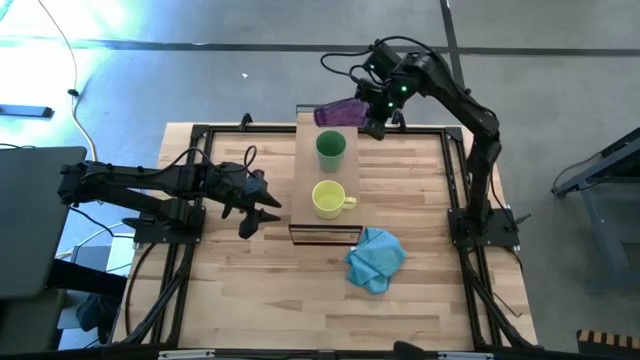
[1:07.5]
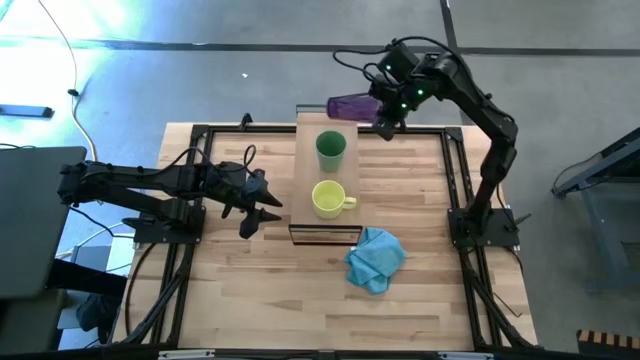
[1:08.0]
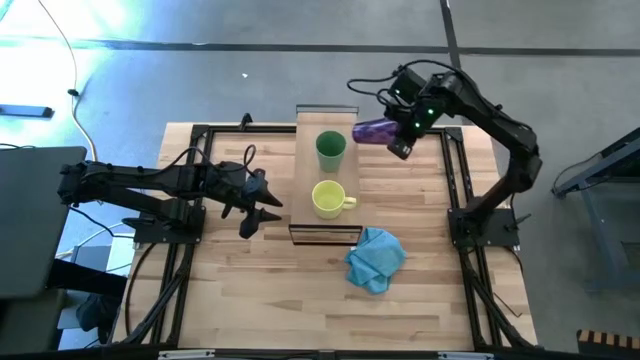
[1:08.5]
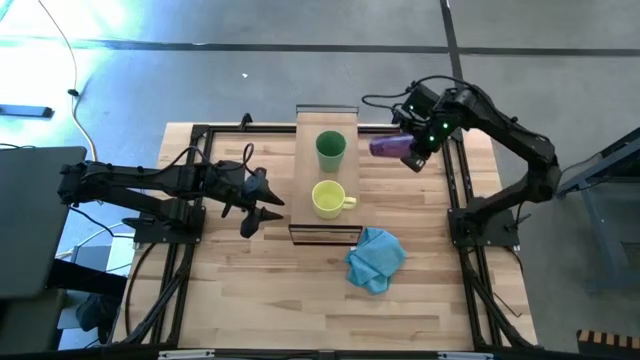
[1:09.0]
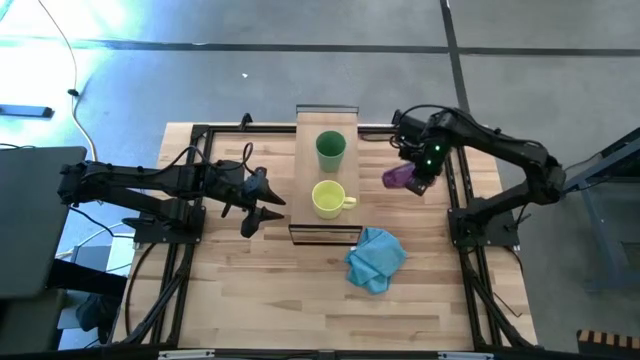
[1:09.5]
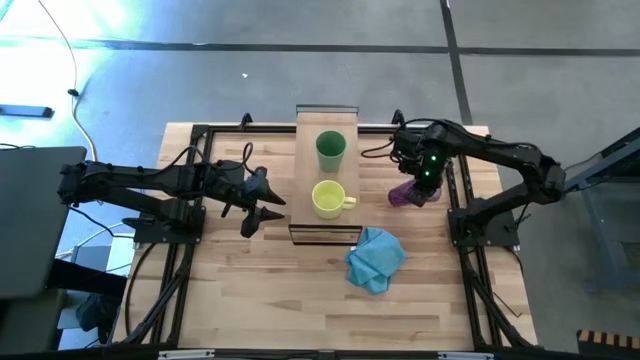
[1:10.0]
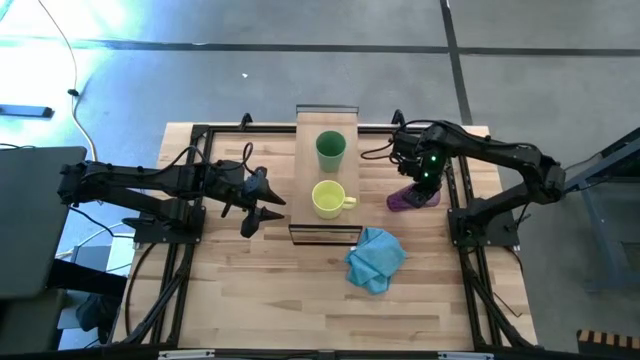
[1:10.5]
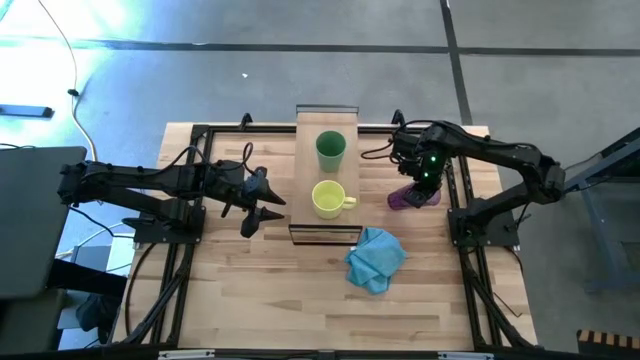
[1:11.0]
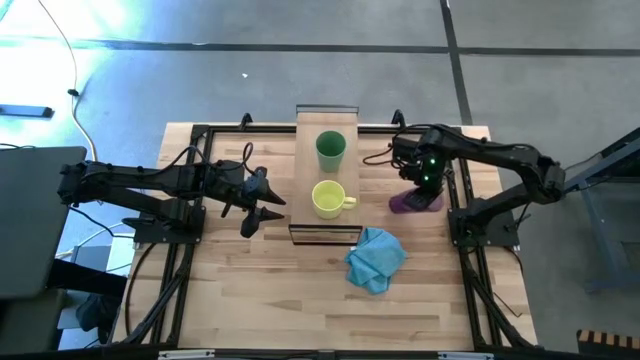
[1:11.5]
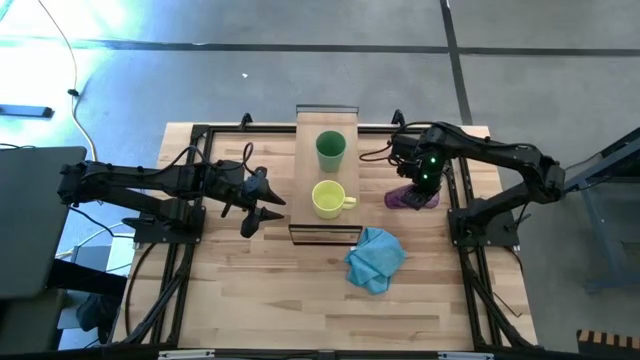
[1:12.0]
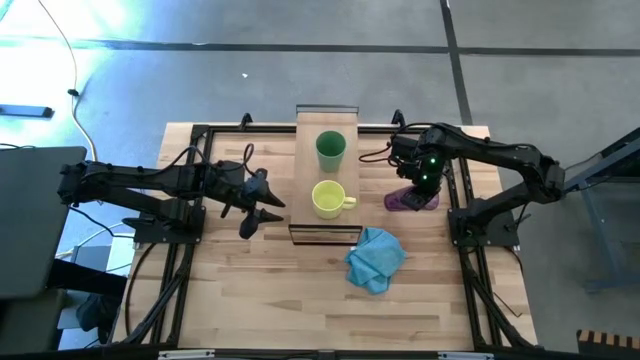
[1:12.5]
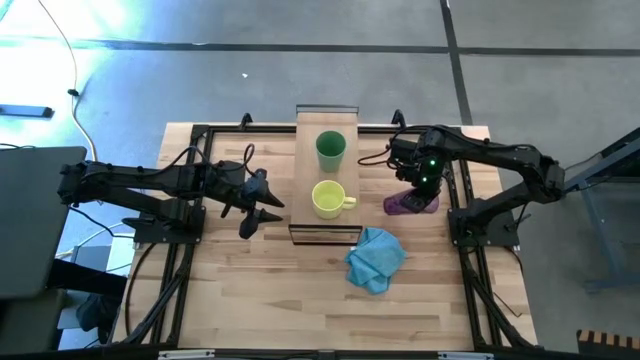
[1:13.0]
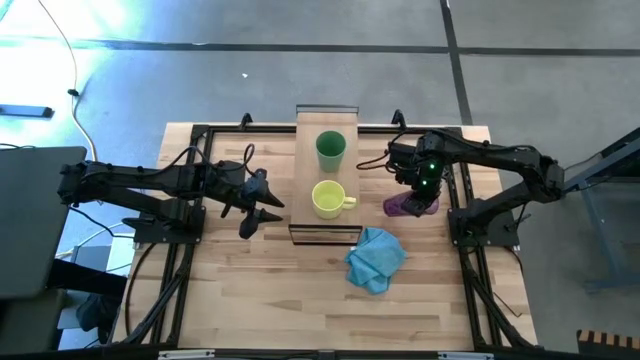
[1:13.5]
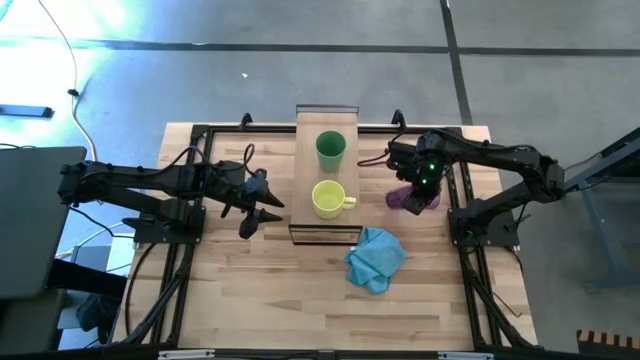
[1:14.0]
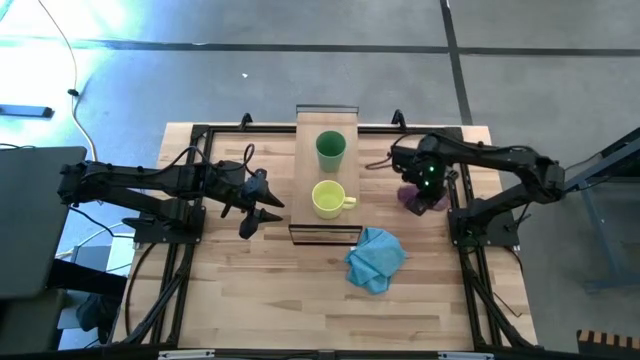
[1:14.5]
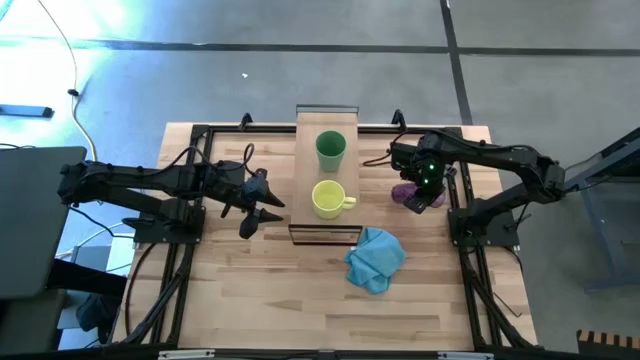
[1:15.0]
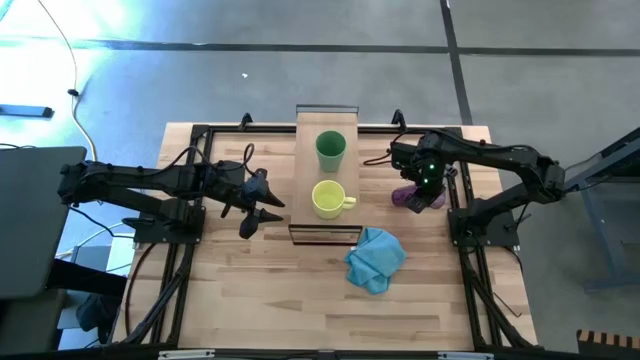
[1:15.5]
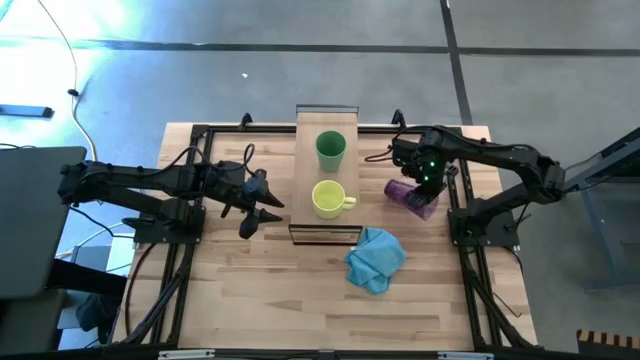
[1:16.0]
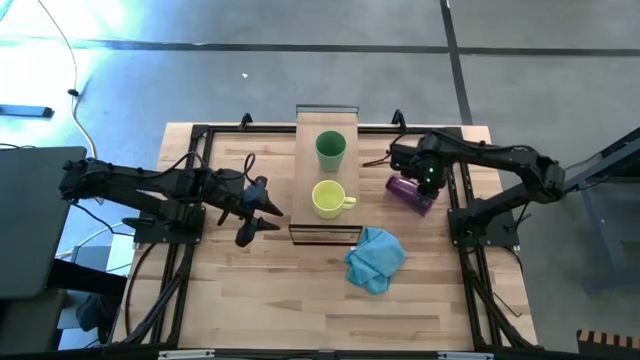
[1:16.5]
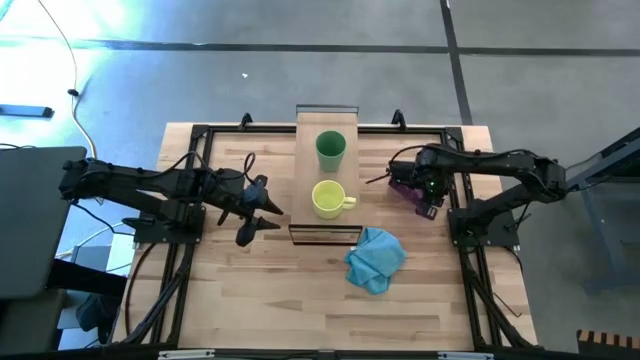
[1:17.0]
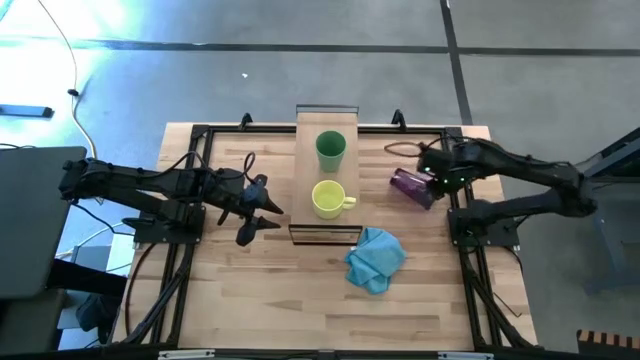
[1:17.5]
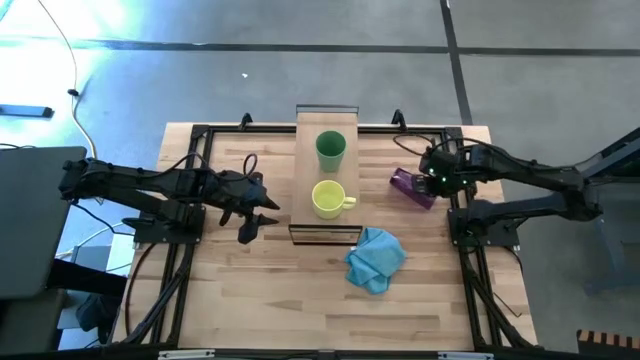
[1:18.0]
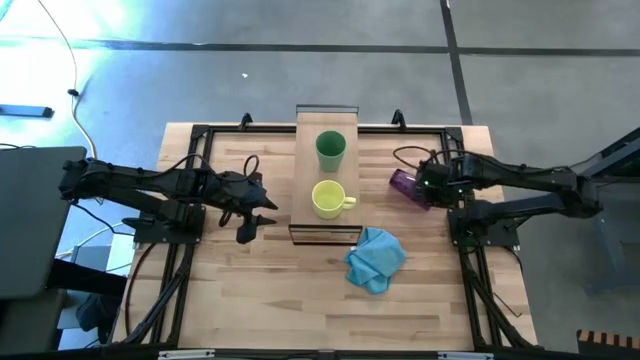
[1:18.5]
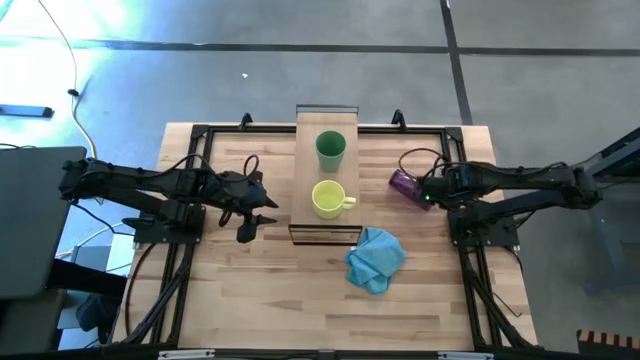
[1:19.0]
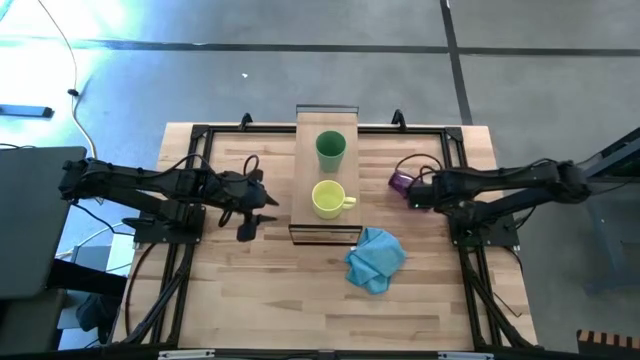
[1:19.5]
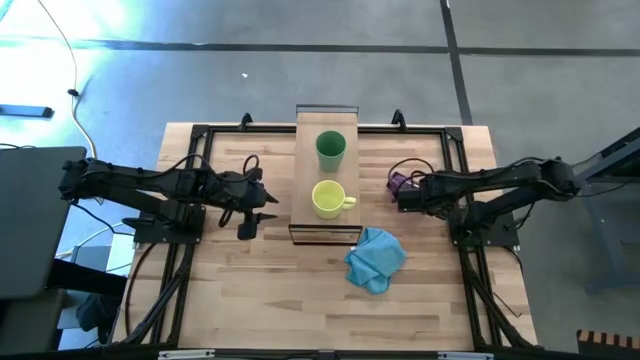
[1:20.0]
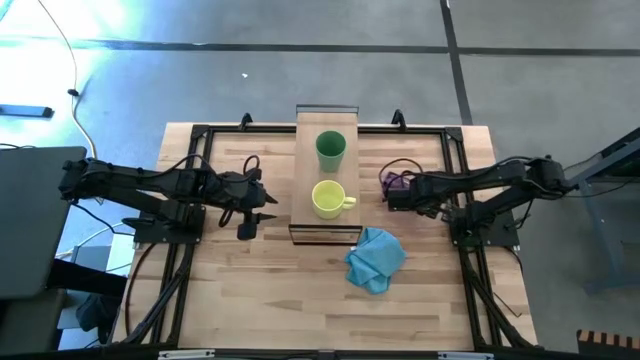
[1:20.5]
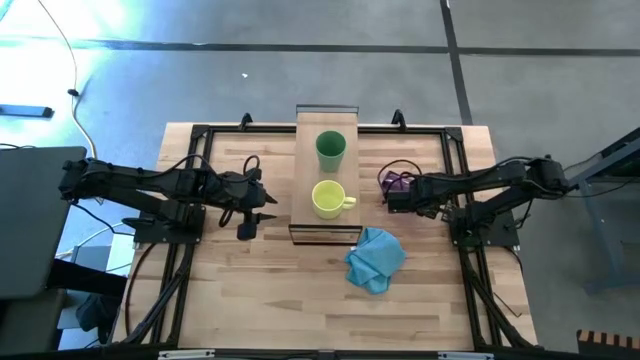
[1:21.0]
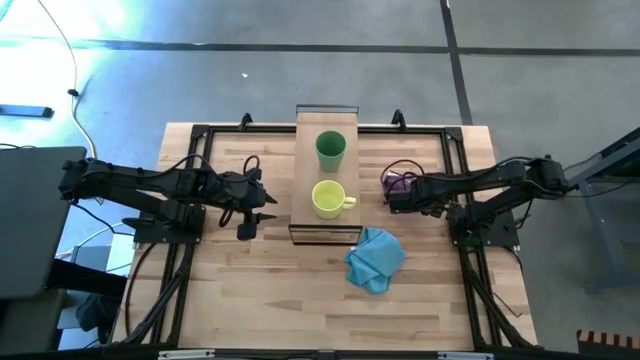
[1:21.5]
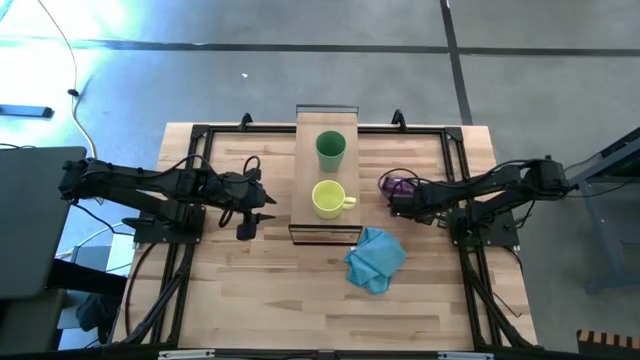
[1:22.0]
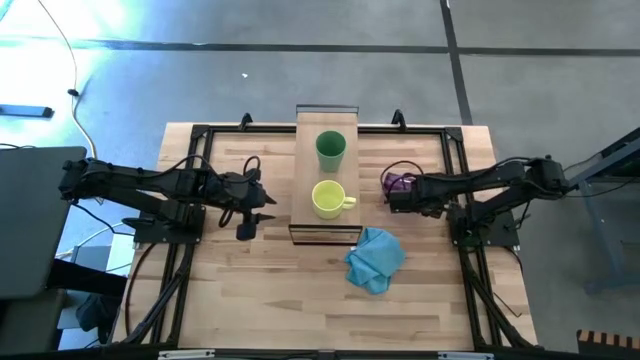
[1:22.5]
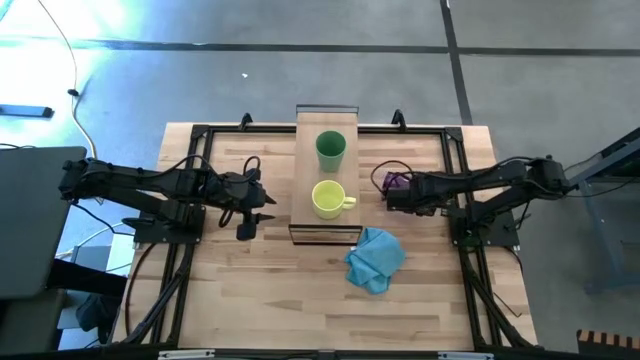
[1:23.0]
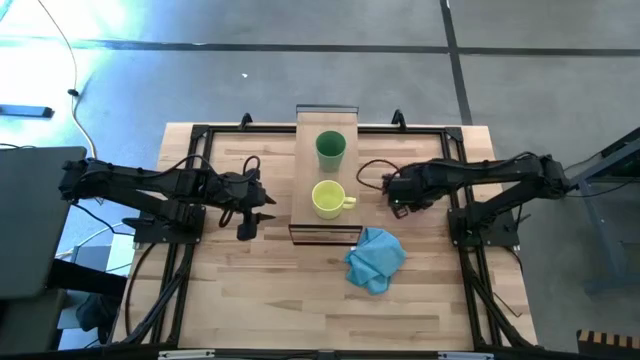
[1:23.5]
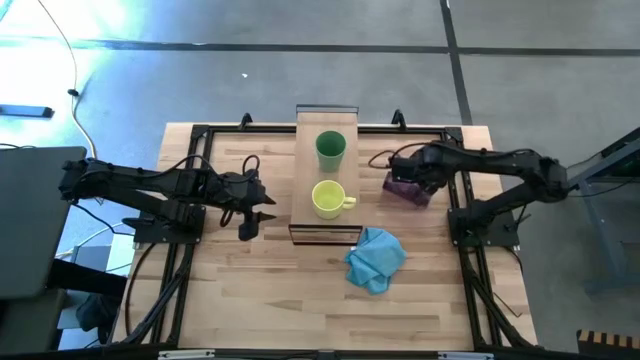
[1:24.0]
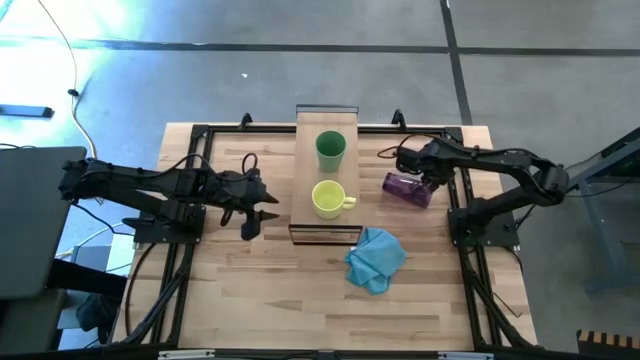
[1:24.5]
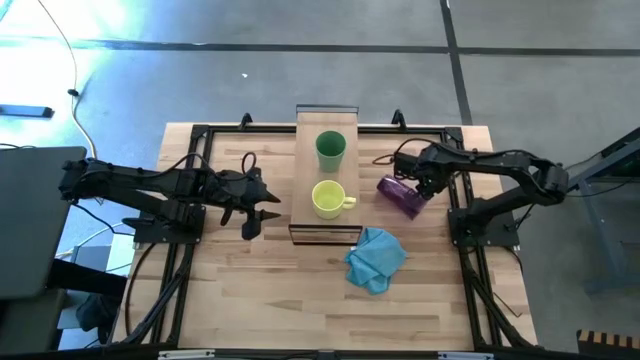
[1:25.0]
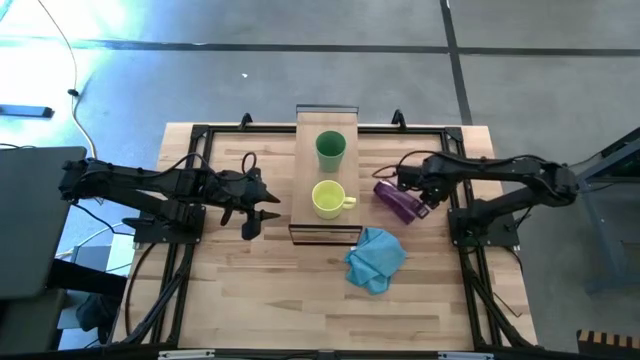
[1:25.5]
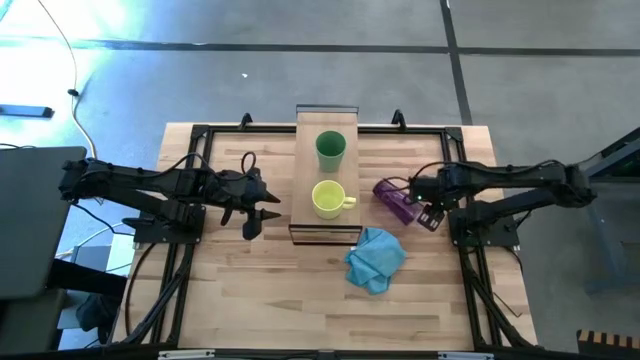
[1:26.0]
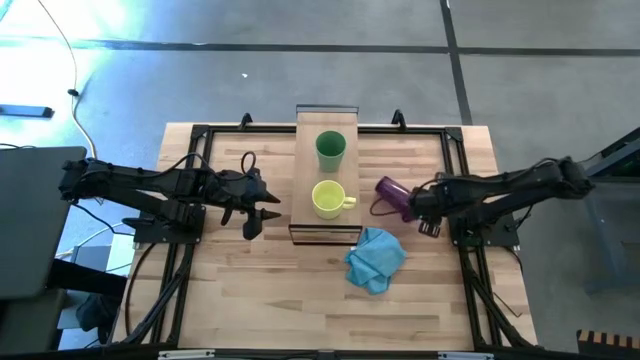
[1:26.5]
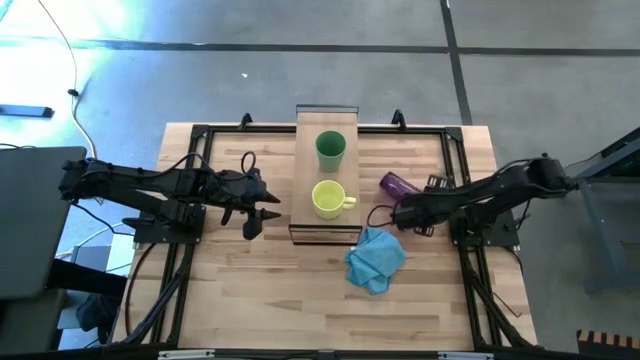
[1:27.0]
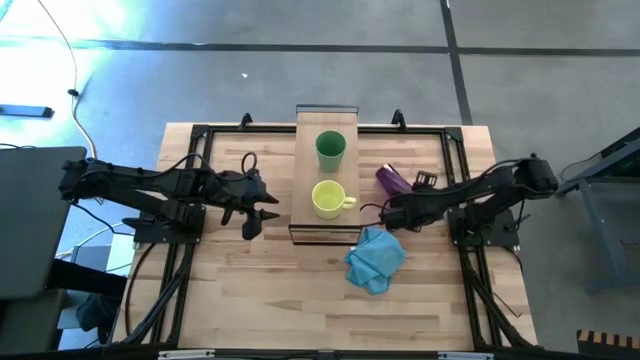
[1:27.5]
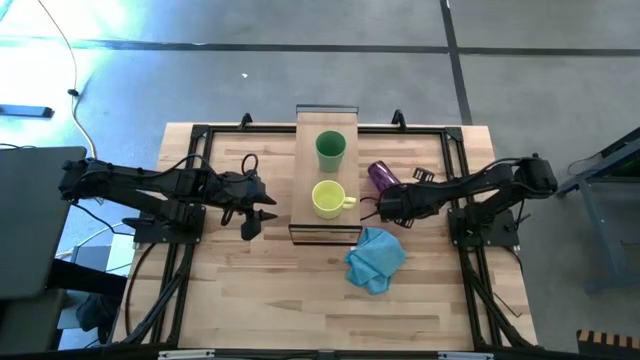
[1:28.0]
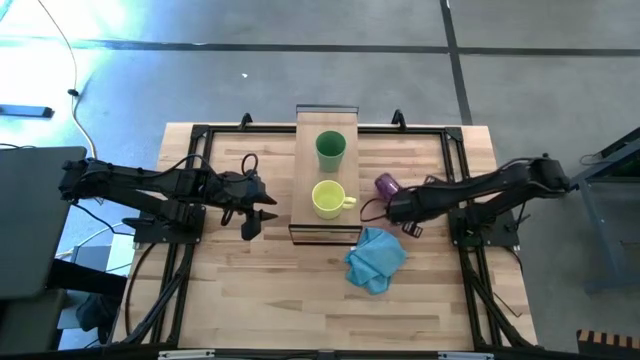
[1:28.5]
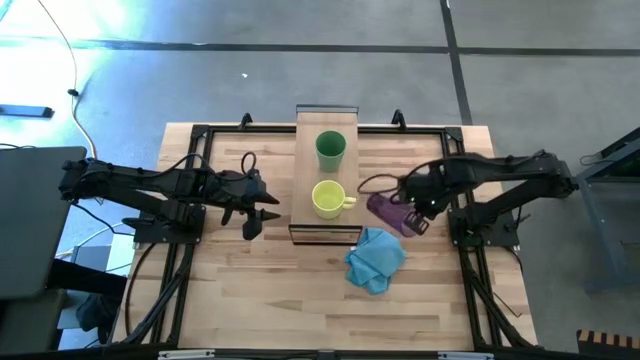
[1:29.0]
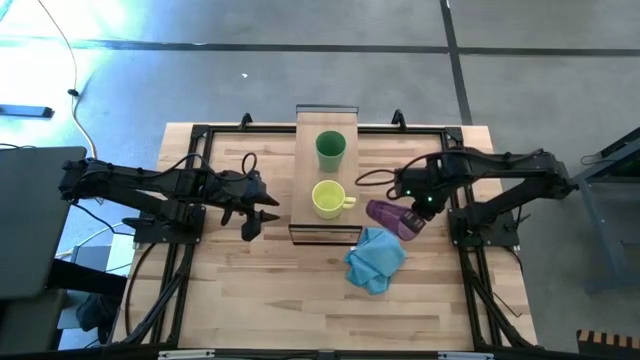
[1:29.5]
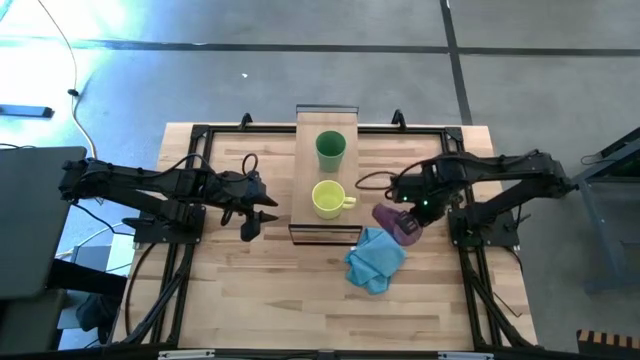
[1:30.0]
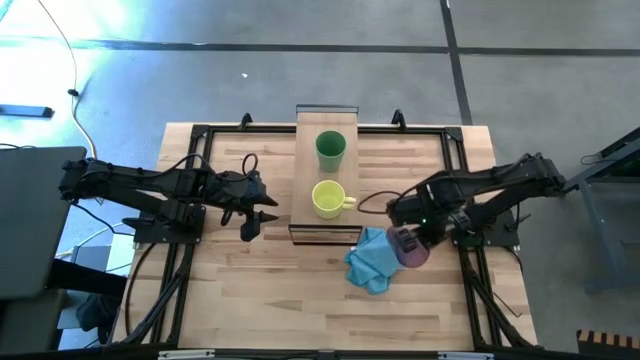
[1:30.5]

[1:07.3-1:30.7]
Task: Stack small to large cups/mugs on shelf
Put the violet cup on the shelf
